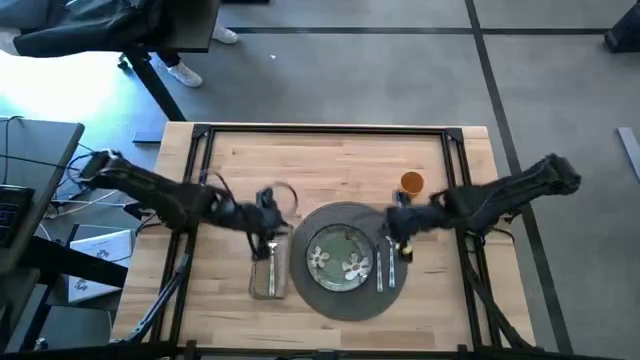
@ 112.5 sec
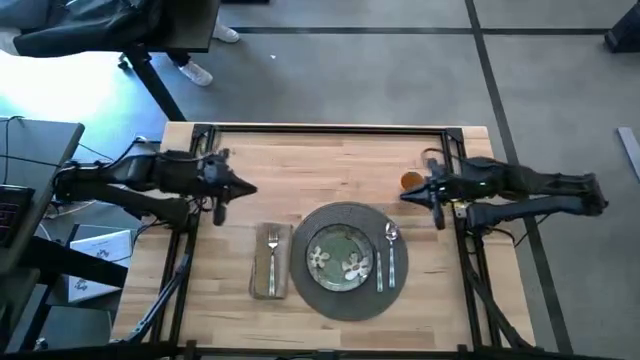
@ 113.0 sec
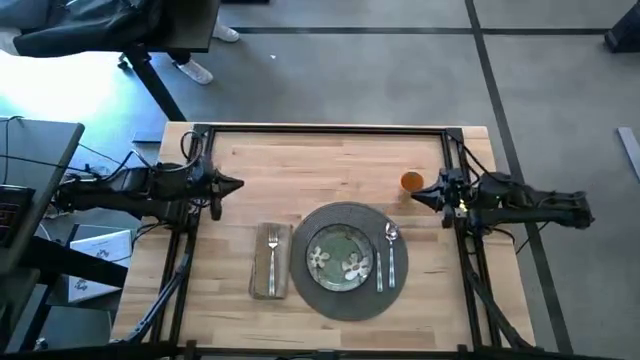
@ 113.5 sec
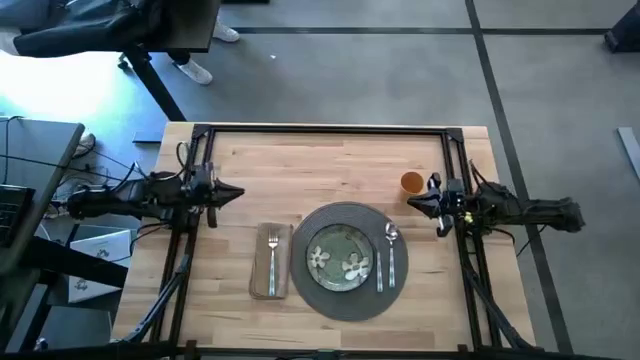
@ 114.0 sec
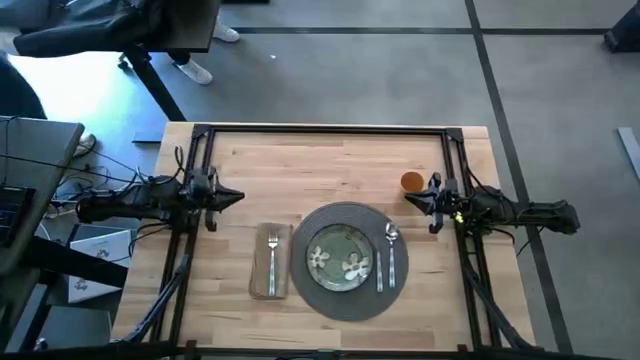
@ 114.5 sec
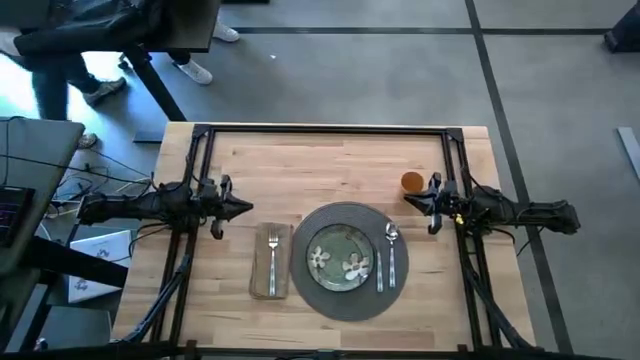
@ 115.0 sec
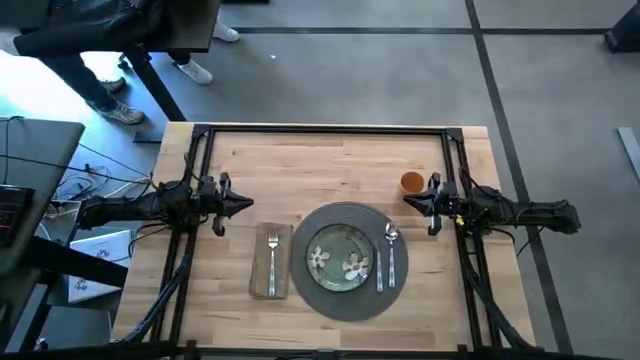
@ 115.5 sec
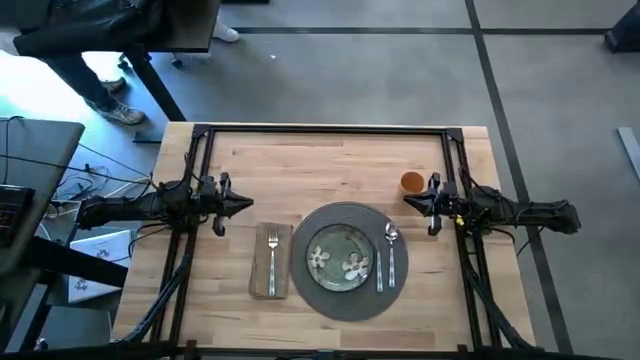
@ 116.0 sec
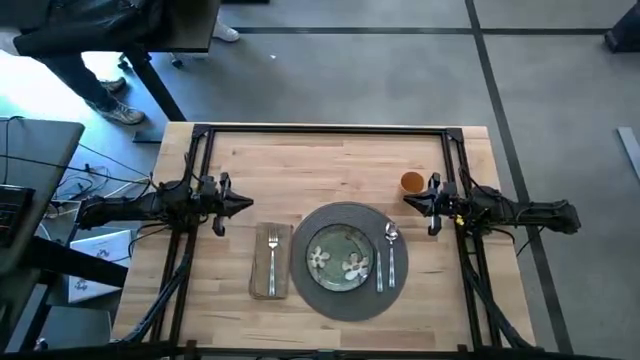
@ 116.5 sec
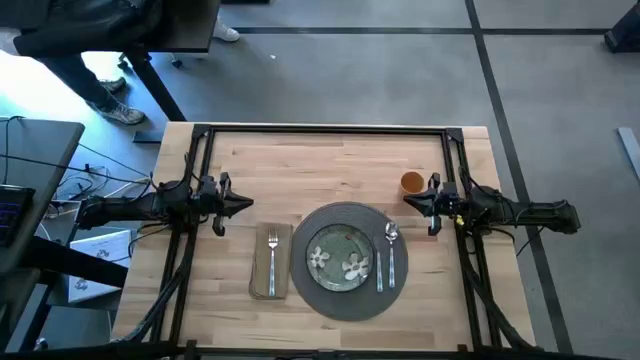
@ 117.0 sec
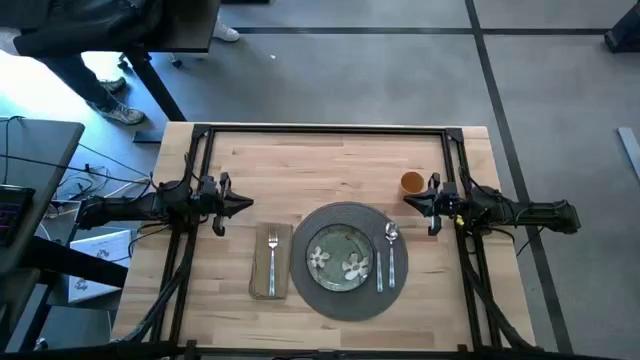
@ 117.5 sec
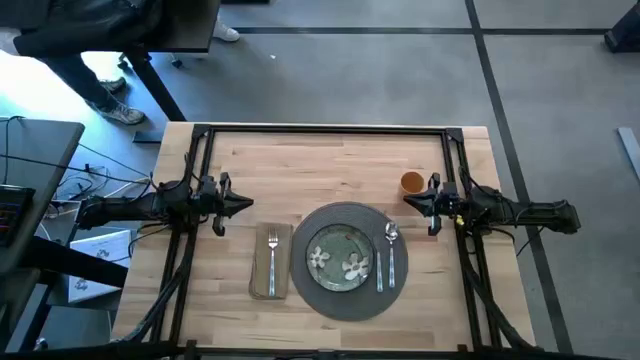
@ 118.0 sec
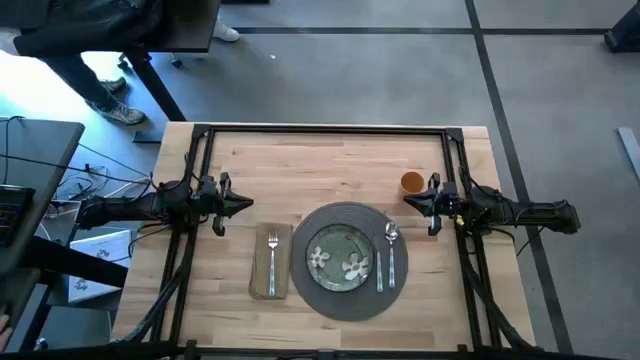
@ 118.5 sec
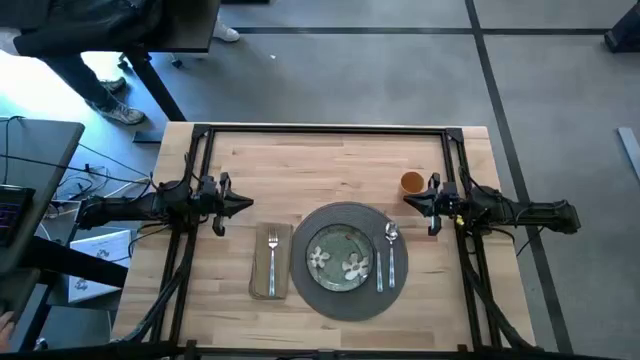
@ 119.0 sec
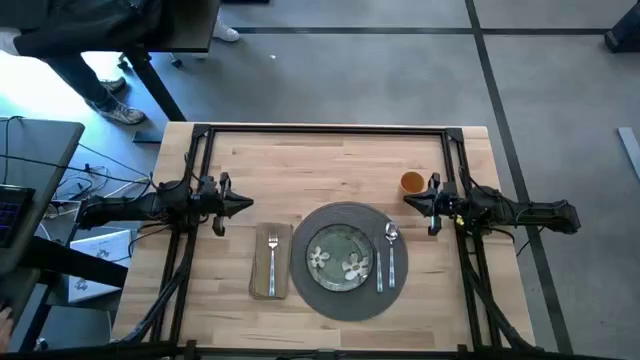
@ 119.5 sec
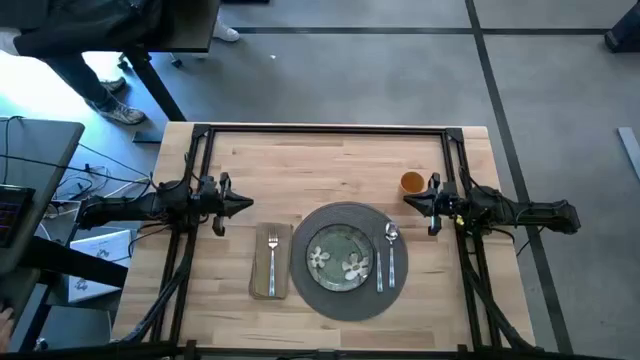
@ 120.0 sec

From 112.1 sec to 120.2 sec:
Task: Set table place
Return to Home Position

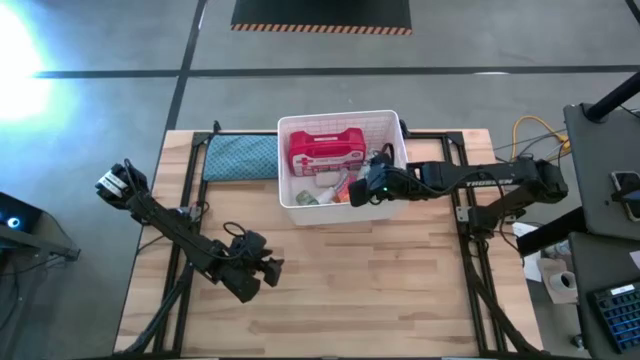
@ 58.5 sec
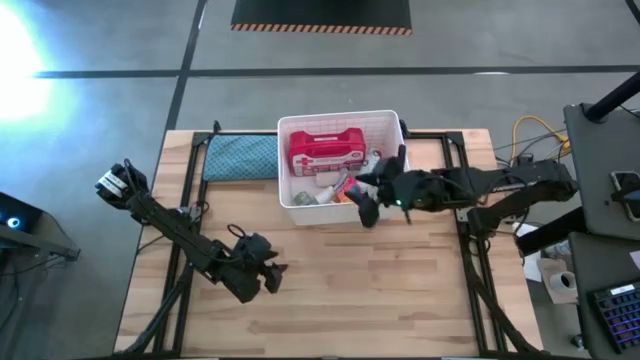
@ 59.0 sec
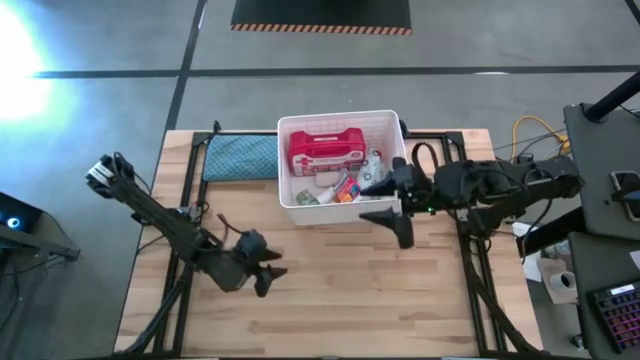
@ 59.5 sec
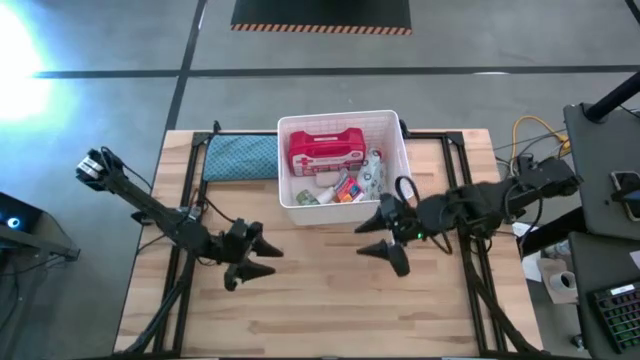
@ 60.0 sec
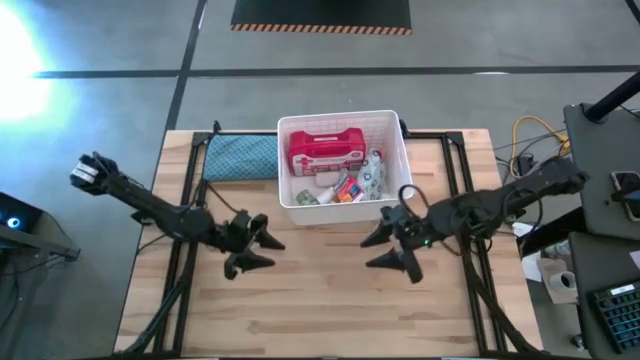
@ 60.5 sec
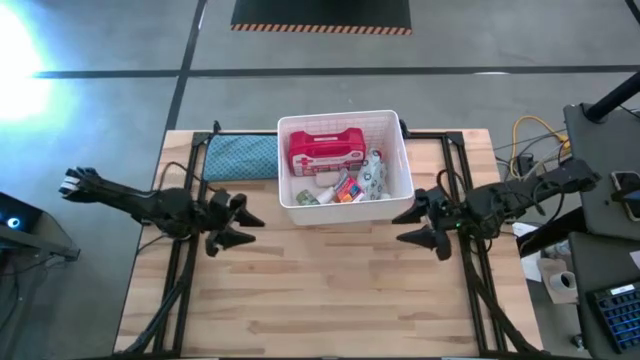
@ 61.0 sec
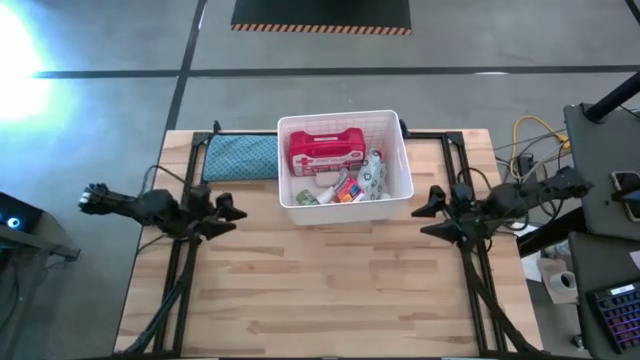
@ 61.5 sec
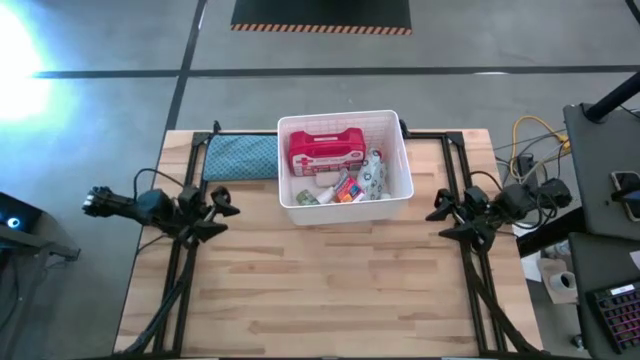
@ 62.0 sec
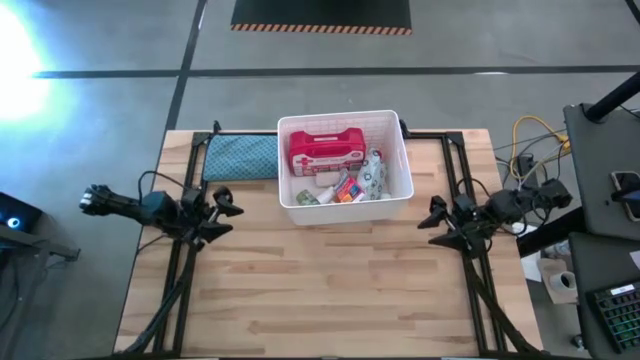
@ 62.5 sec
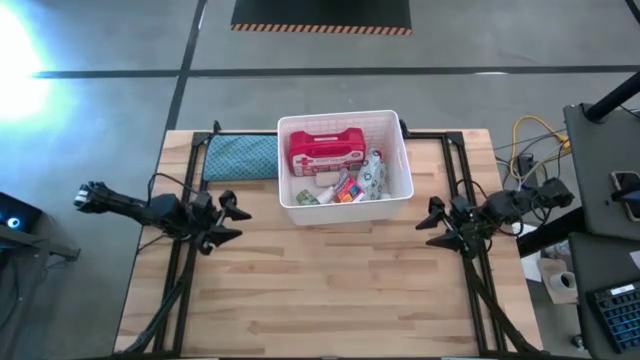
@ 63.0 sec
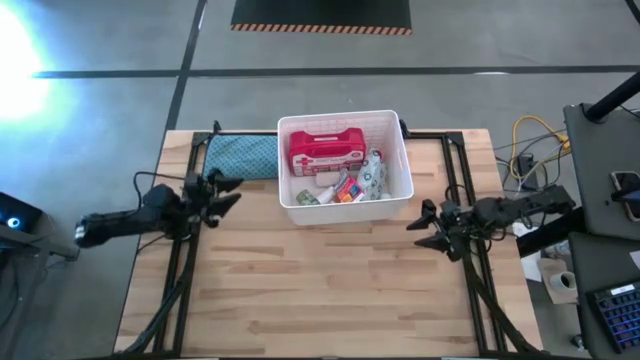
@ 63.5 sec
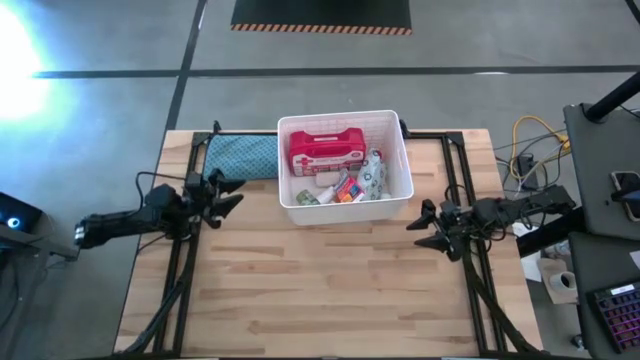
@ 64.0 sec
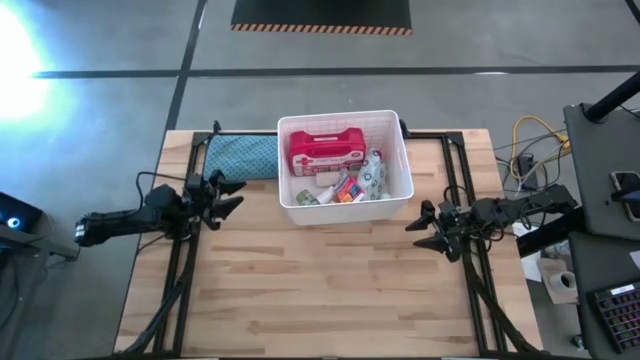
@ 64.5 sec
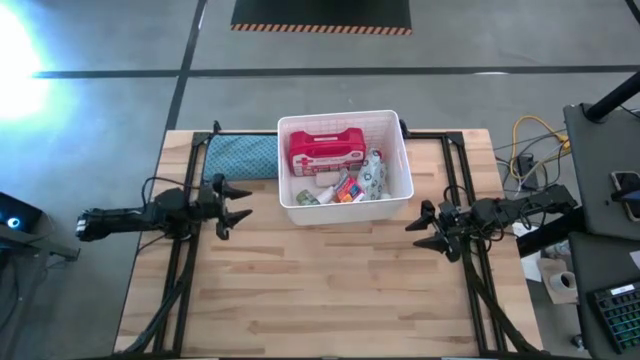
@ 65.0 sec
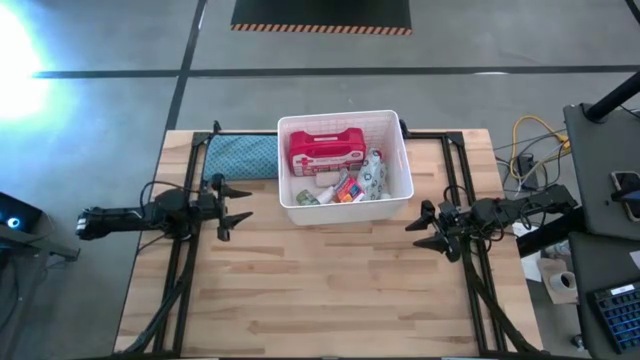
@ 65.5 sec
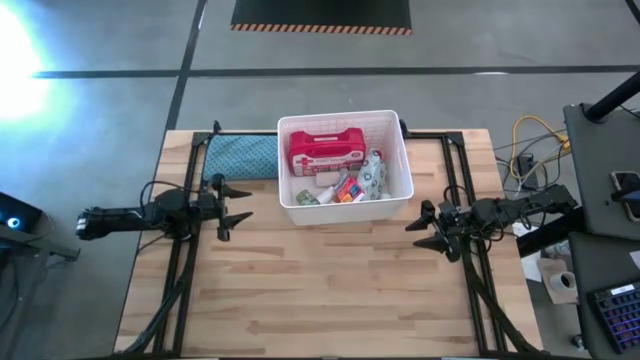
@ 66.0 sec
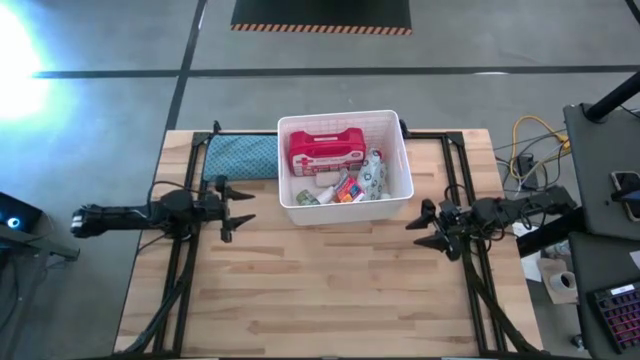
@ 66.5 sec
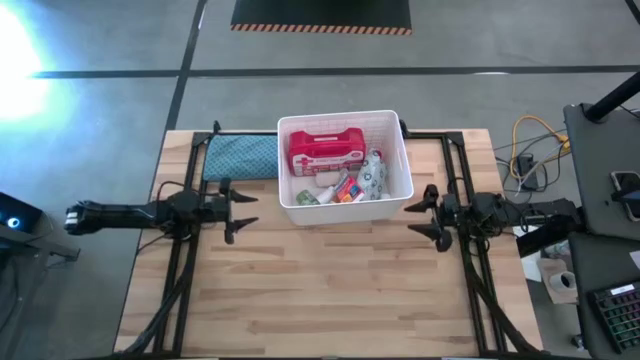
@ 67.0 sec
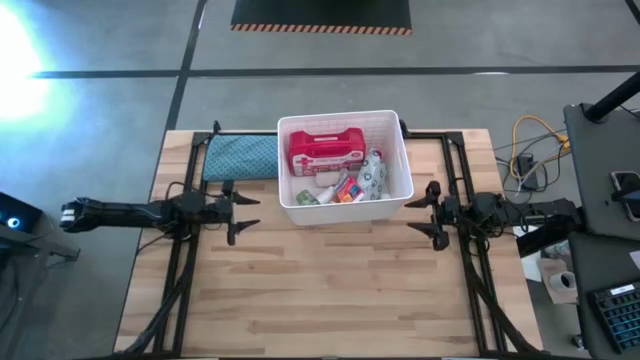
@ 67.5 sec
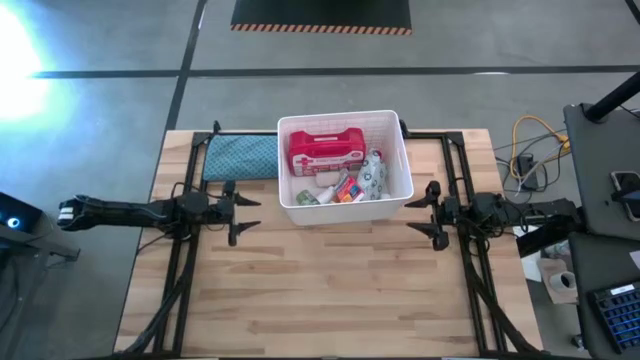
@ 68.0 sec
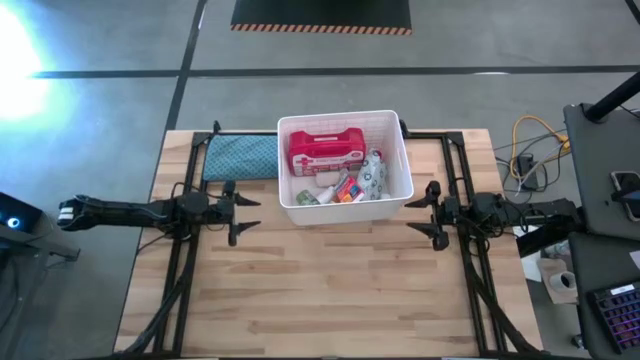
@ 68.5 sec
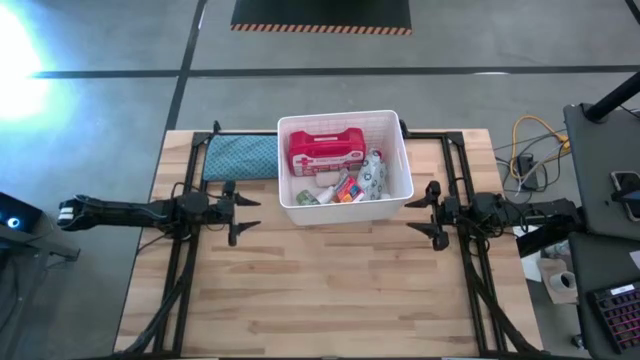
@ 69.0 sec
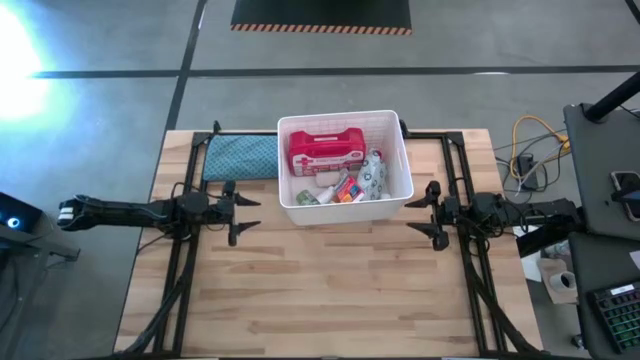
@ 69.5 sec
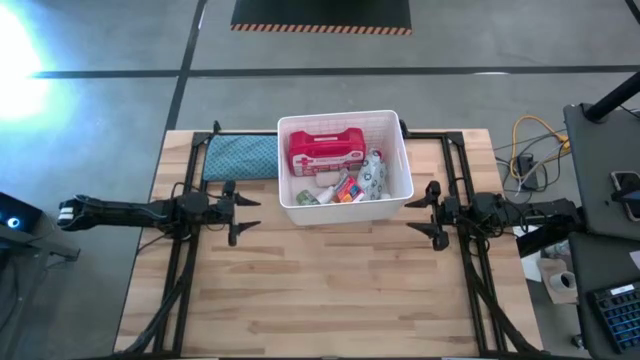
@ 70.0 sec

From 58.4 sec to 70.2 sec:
Task: Pick & place medical supplies in basket/bin
Return to Home Position
